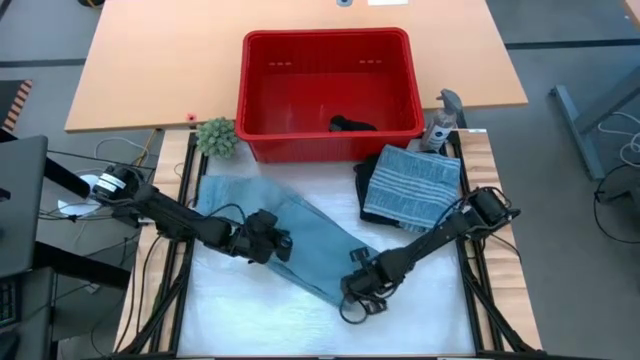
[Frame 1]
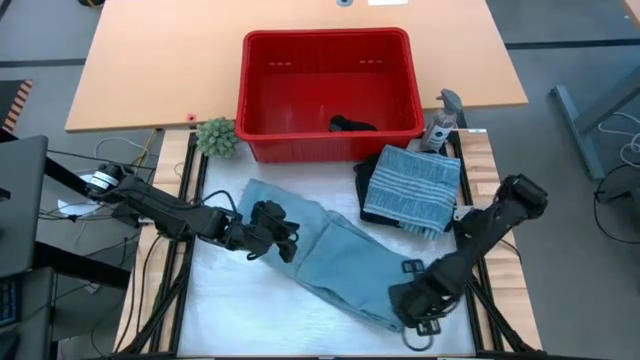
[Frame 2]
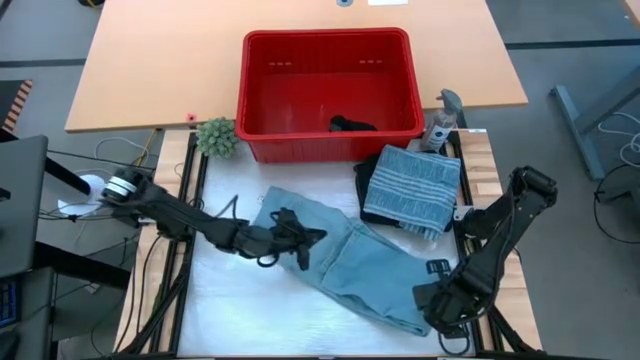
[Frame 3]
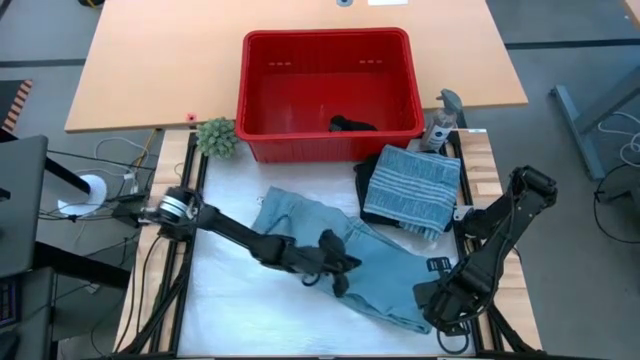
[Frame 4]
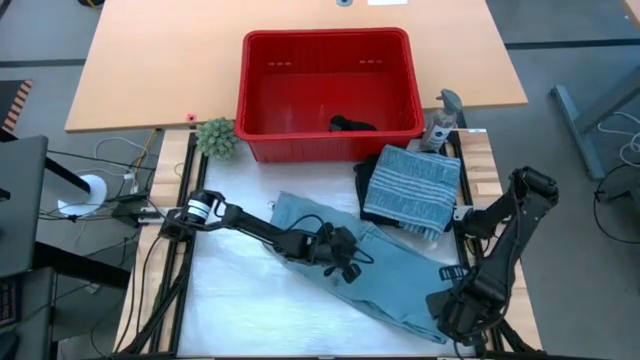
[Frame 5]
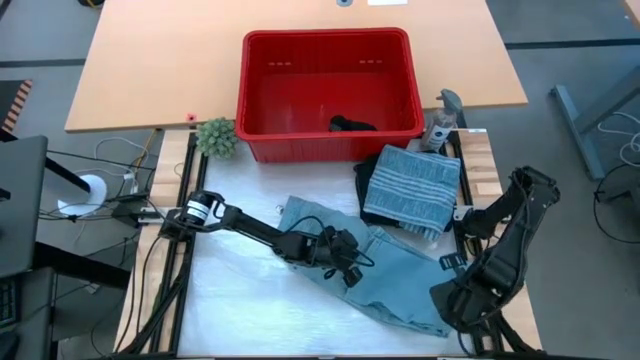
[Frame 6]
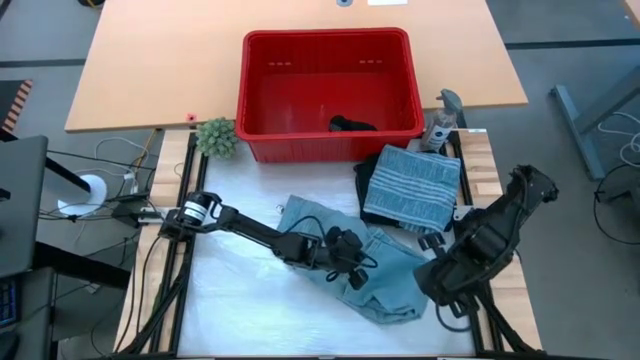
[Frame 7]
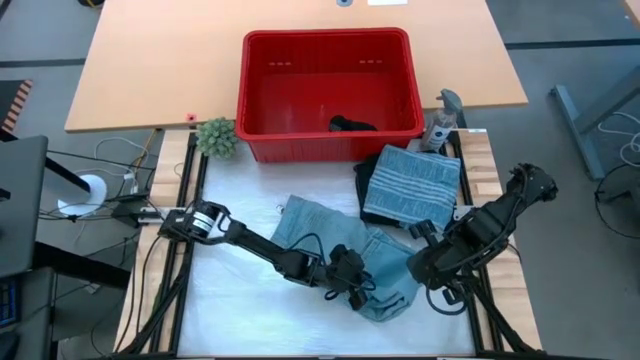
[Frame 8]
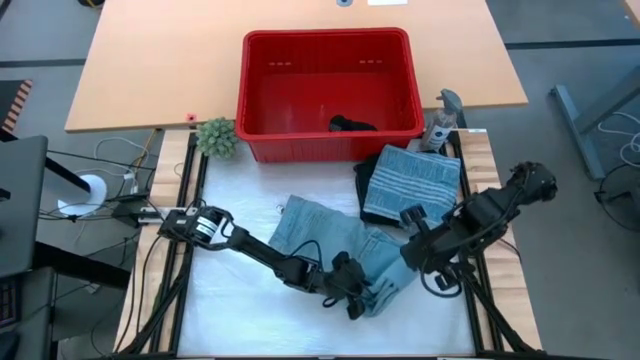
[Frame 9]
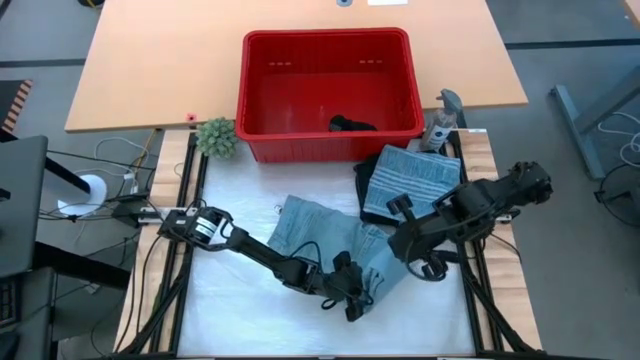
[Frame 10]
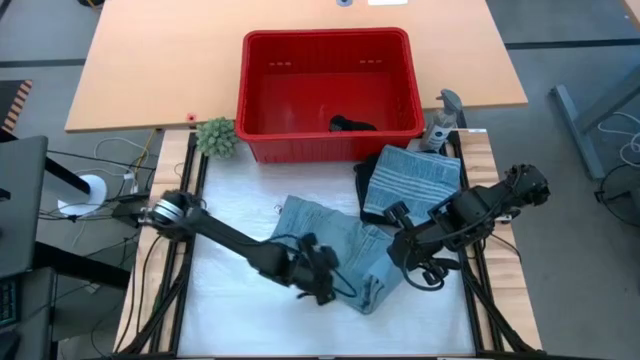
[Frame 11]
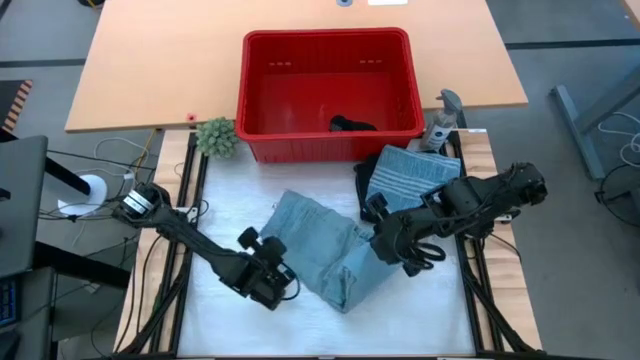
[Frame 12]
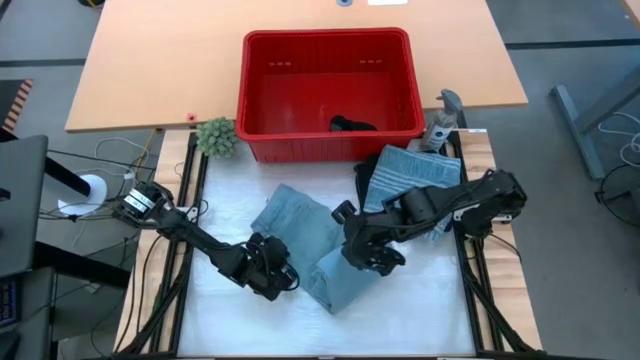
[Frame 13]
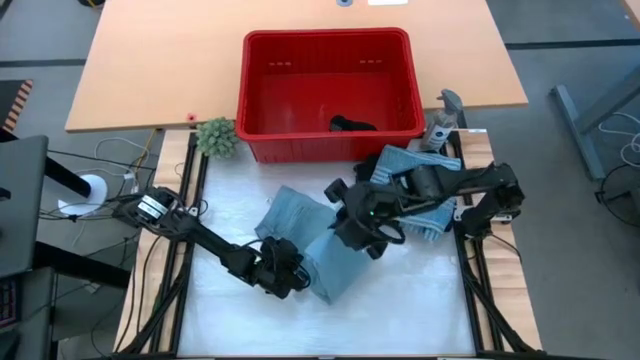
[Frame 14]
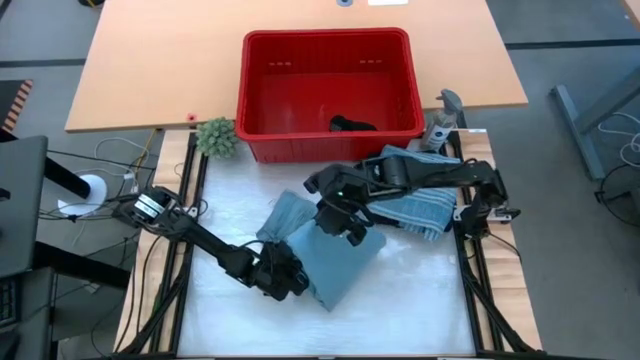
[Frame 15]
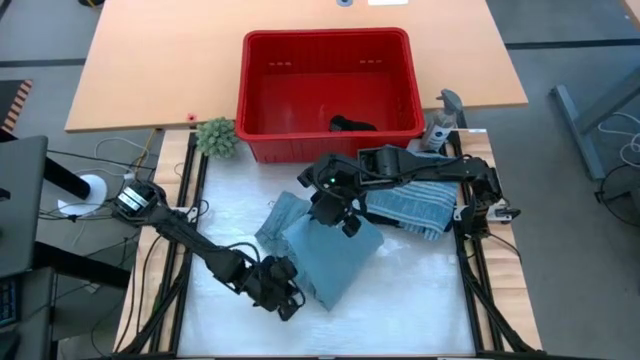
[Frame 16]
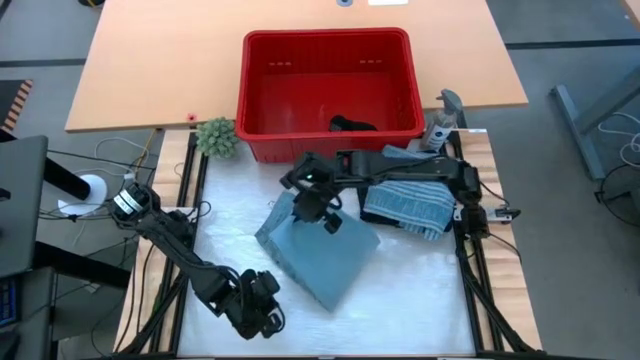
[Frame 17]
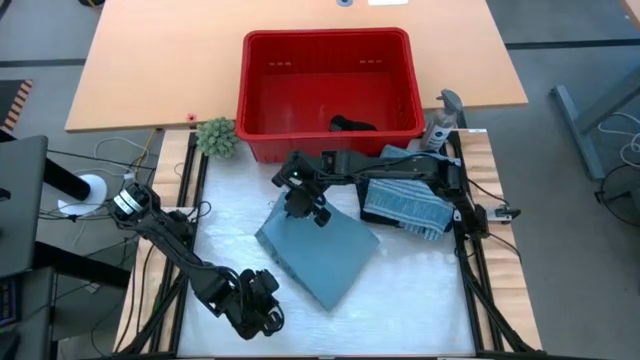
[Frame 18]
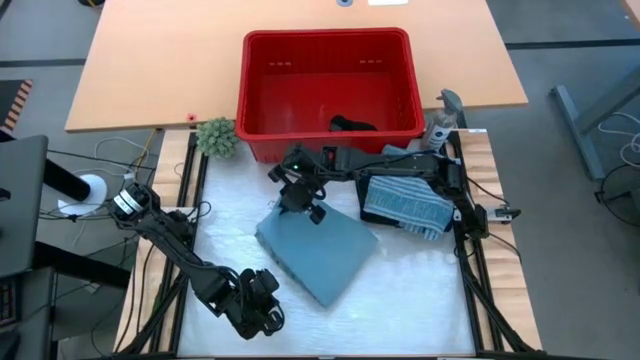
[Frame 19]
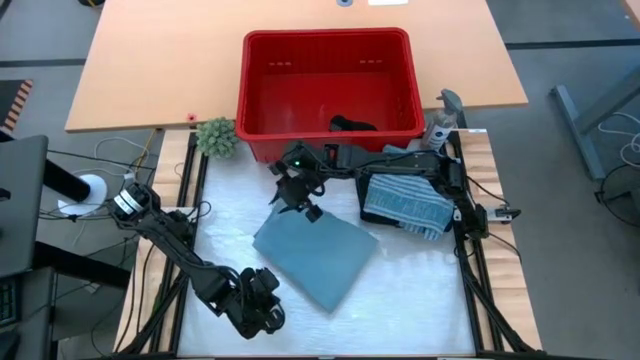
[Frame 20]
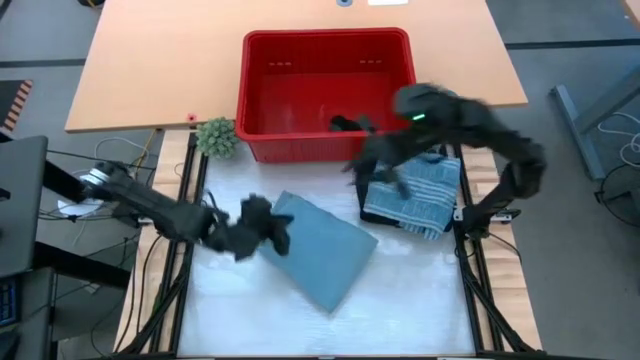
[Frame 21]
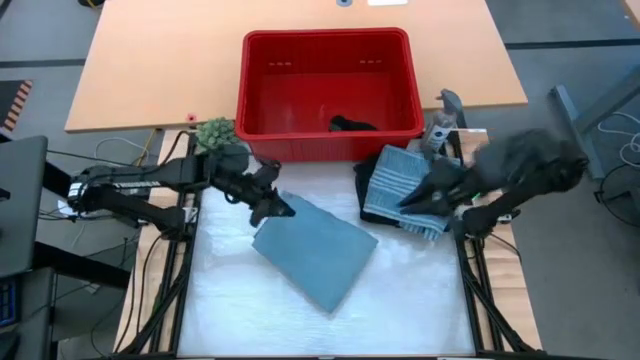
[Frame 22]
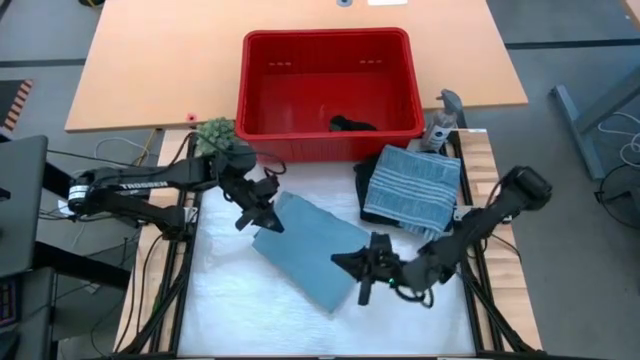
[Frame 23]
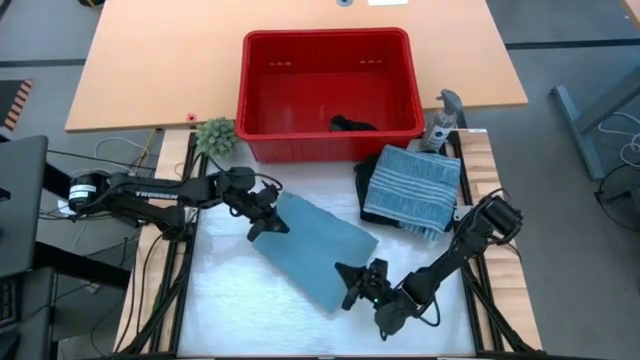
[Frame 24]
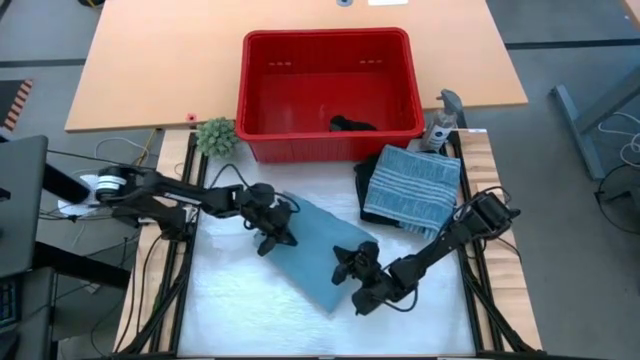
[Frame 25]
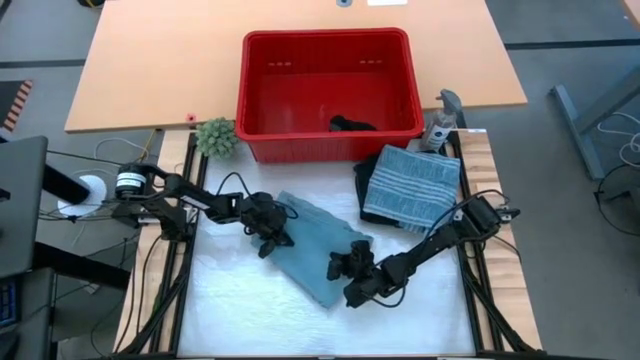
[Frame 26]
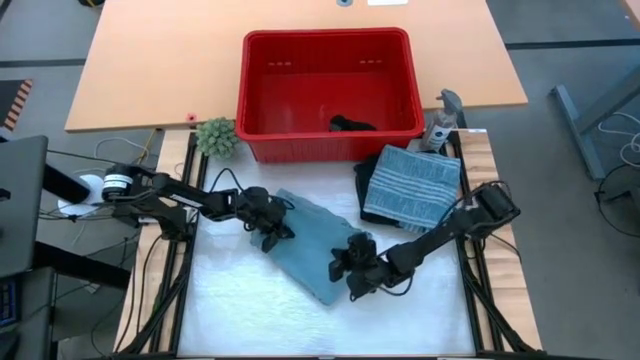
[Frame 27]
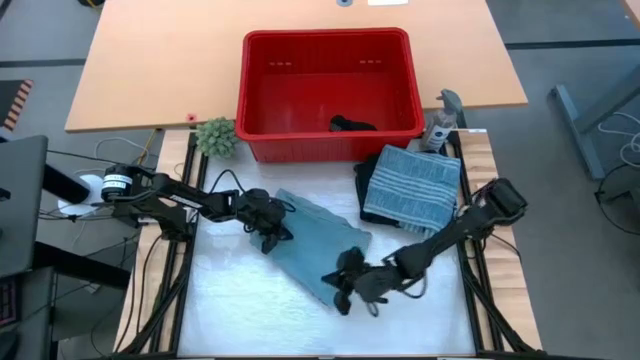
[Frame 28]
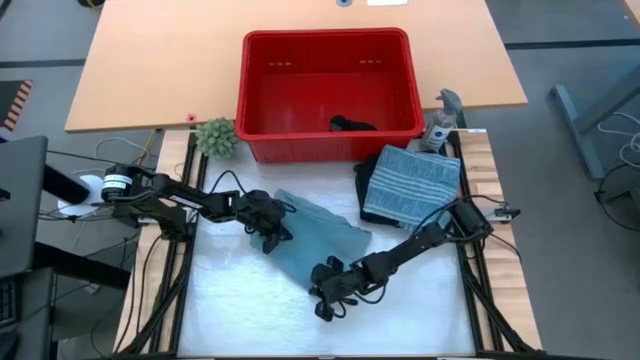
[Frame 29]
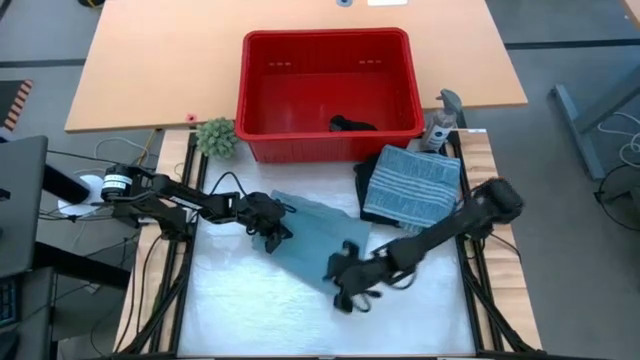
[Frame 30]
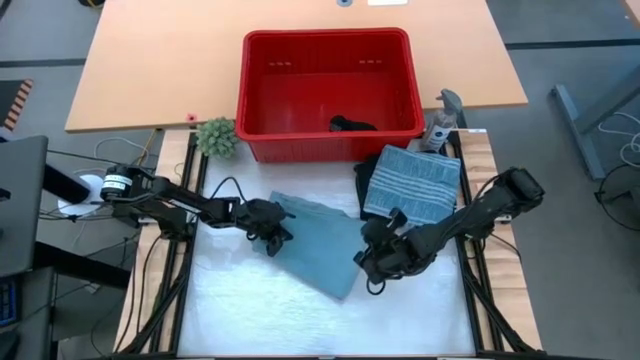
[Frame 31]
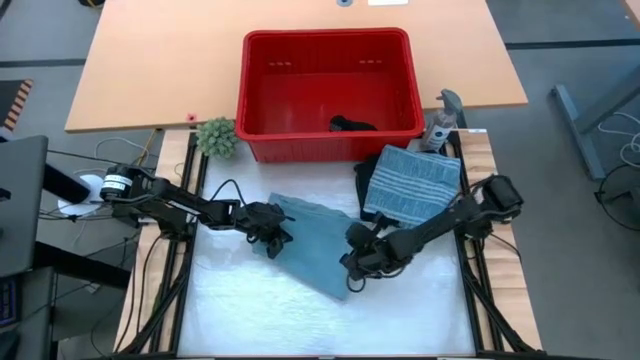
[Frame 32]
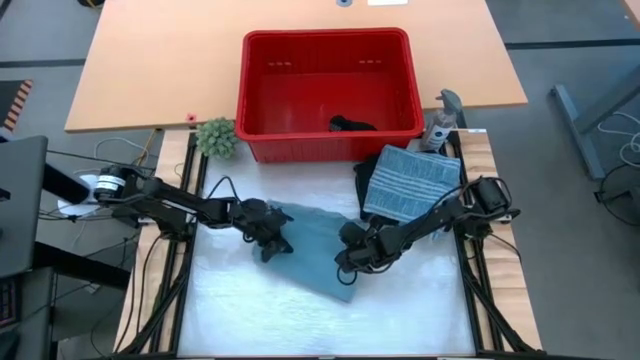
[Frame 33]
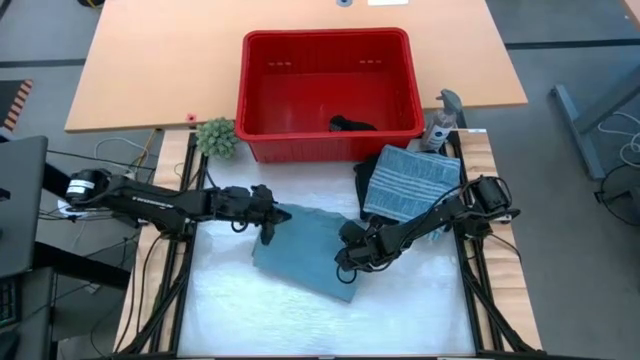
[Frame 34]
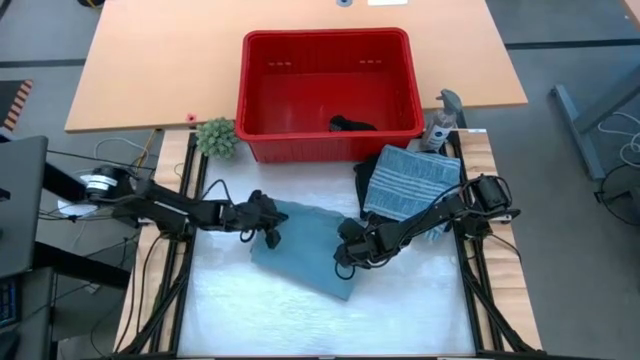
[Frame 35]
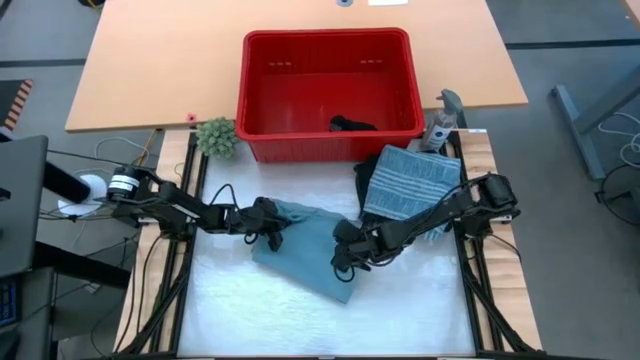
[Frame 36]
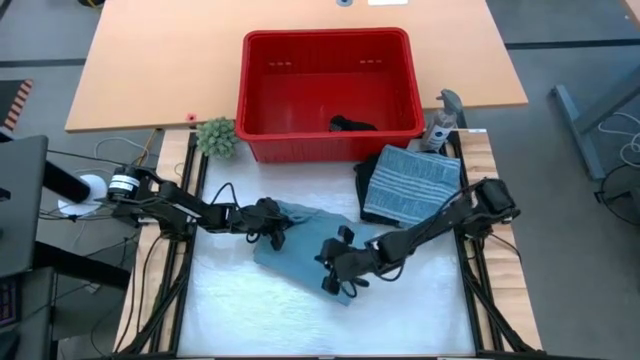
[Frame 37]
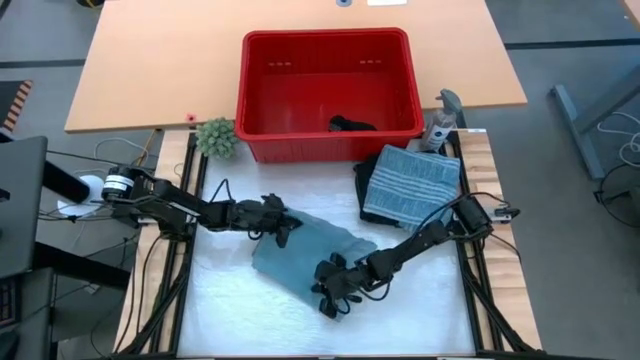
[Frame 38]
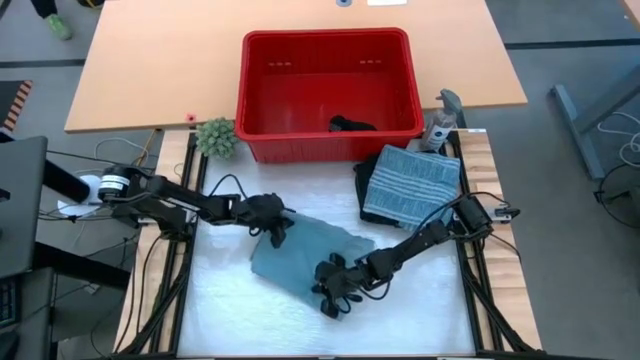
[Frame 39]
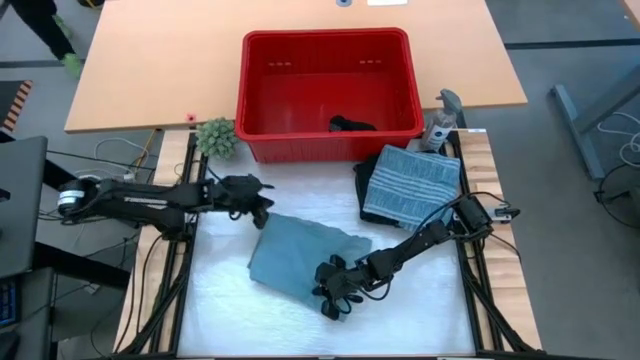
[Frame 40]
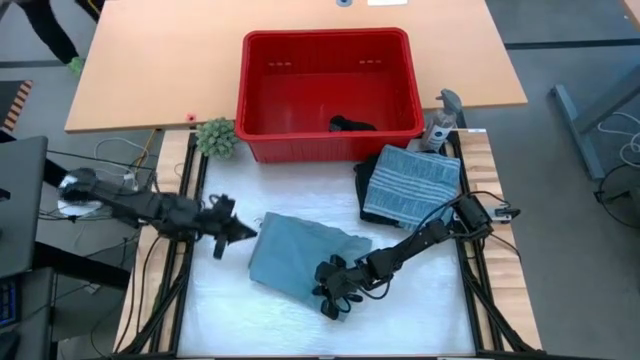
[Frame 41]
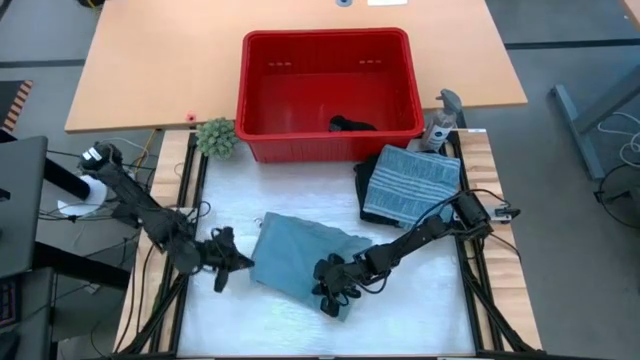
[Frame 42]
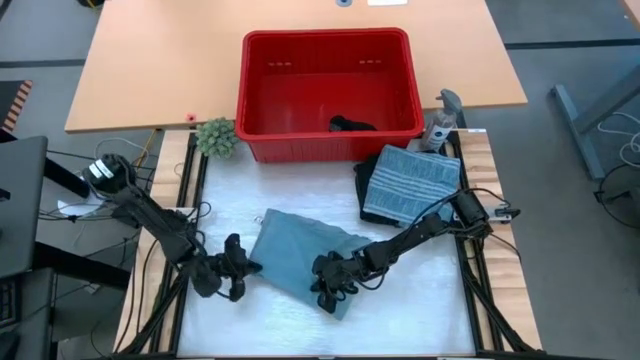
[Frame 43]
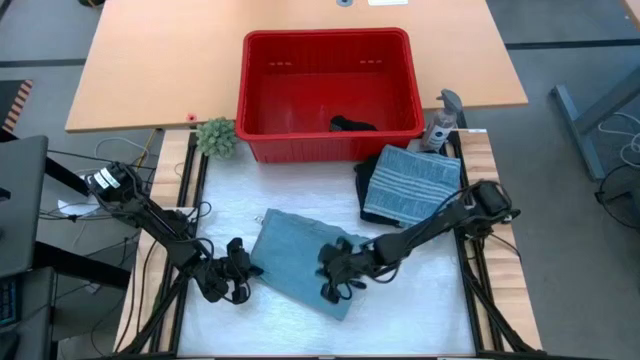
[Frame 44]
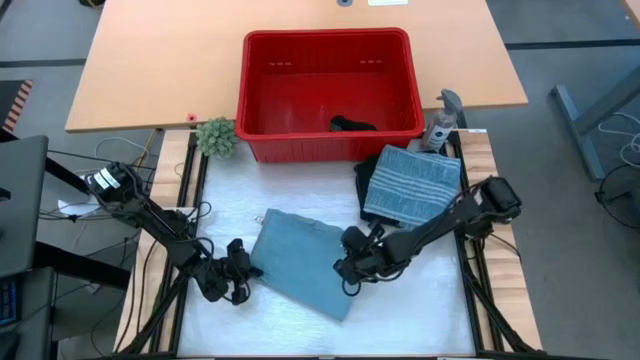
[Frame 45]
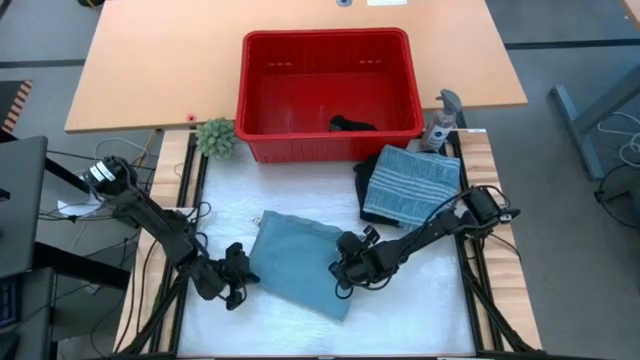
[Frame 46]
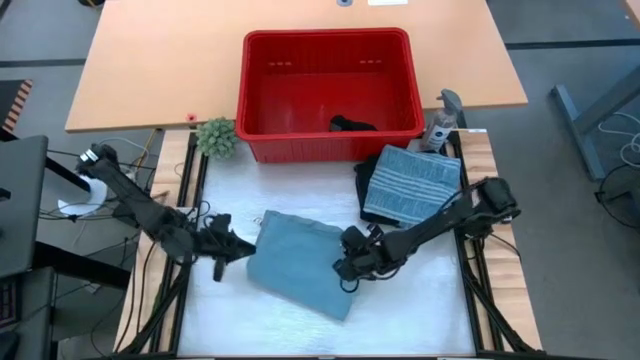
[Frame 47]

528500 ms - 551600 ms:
Task: Fold Laundry from Bin
Fold the blue pants
